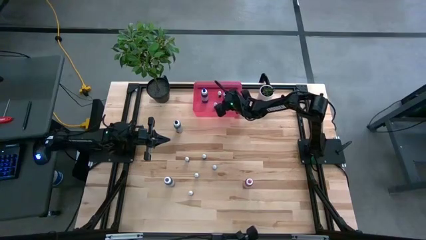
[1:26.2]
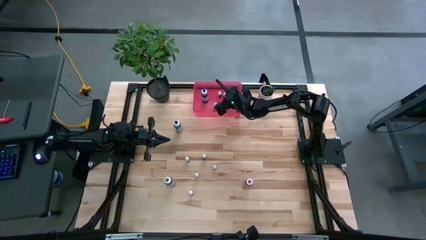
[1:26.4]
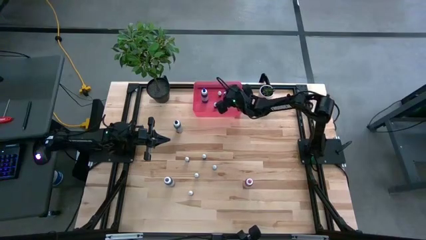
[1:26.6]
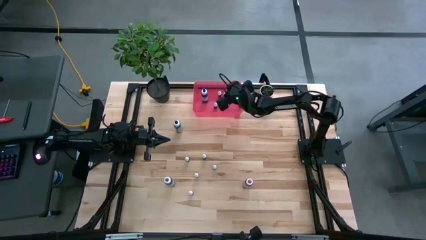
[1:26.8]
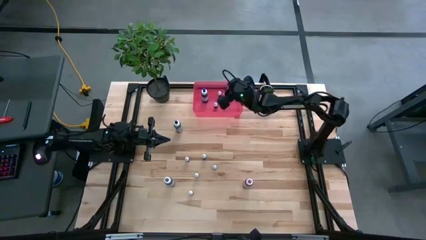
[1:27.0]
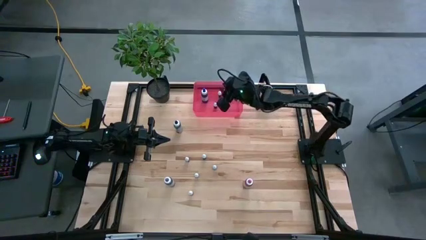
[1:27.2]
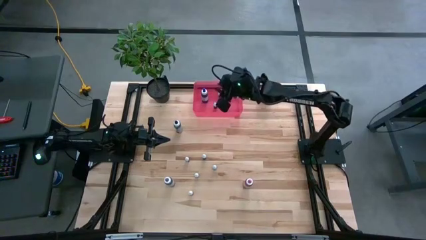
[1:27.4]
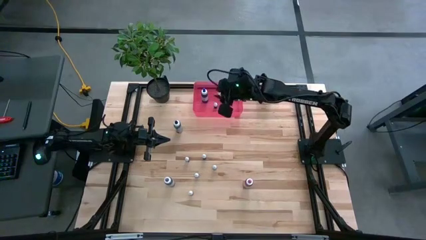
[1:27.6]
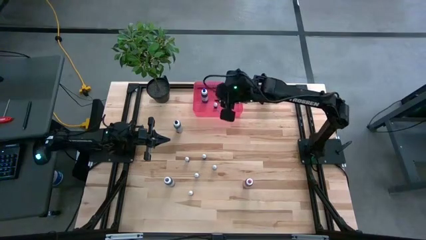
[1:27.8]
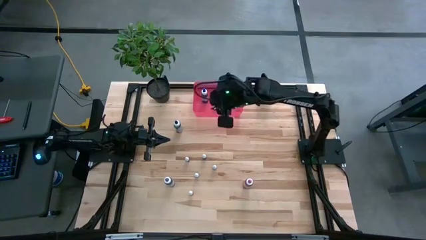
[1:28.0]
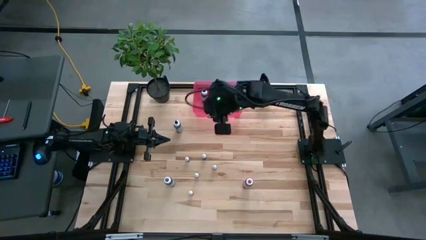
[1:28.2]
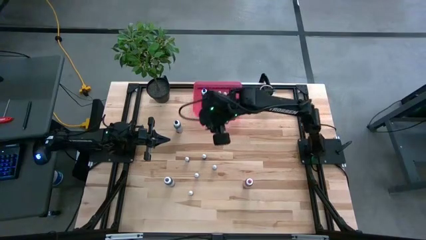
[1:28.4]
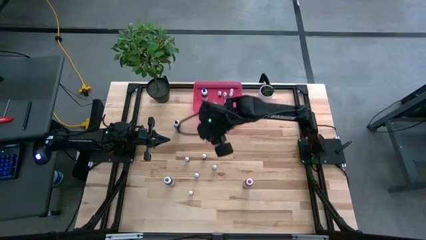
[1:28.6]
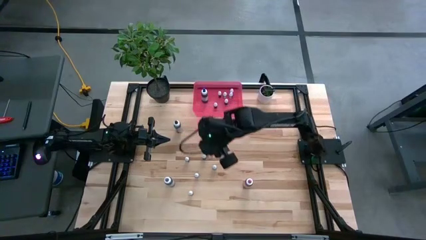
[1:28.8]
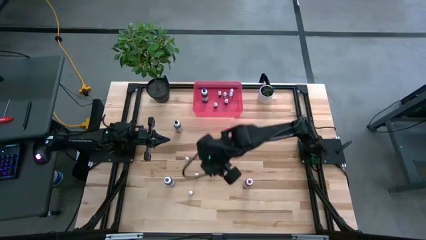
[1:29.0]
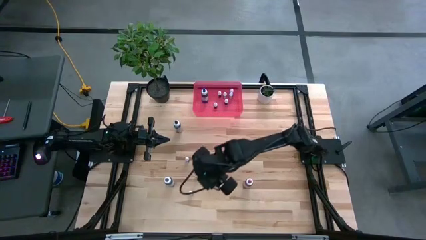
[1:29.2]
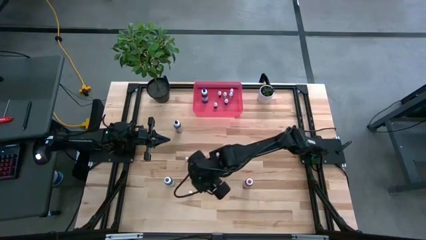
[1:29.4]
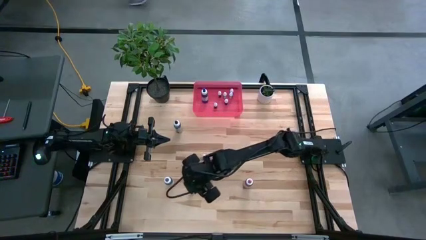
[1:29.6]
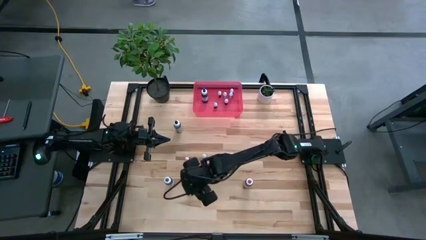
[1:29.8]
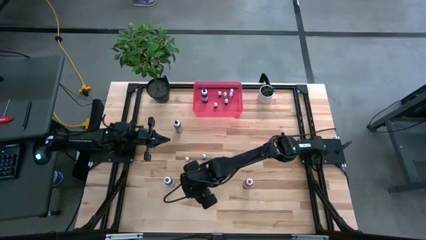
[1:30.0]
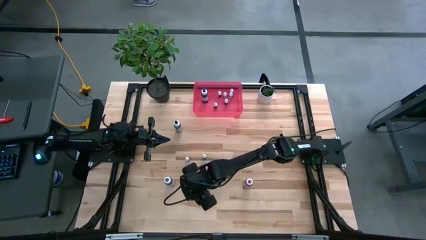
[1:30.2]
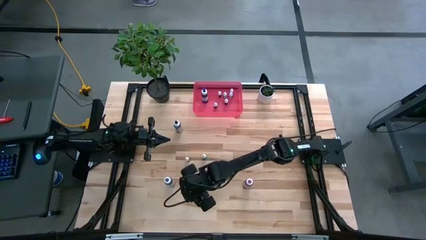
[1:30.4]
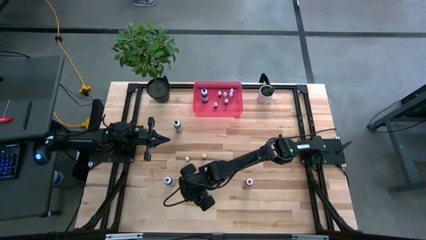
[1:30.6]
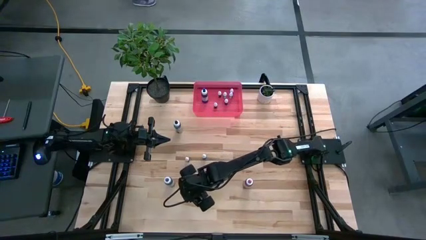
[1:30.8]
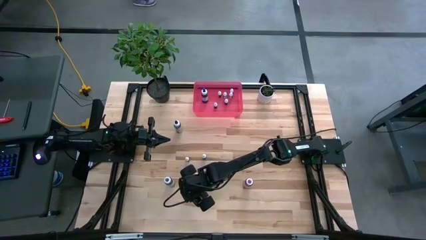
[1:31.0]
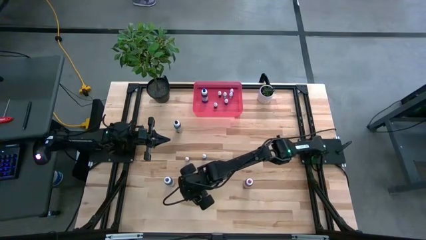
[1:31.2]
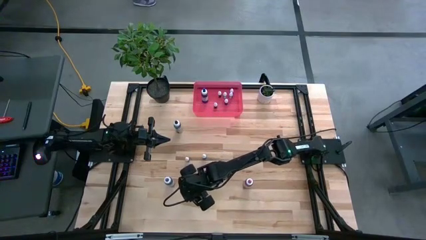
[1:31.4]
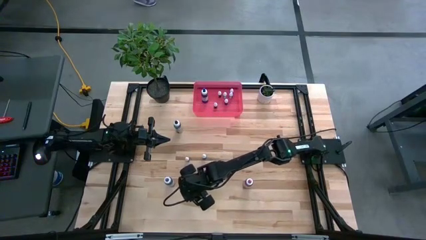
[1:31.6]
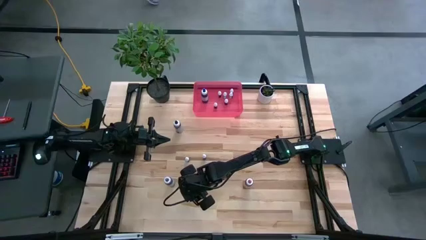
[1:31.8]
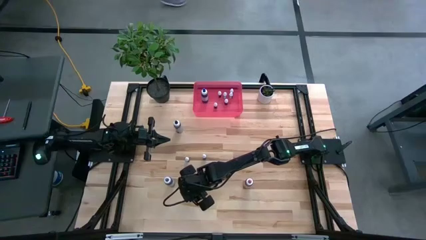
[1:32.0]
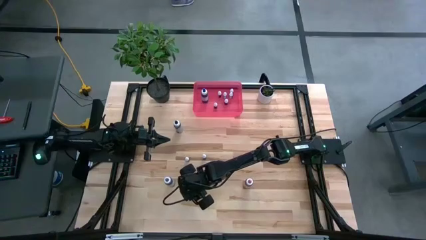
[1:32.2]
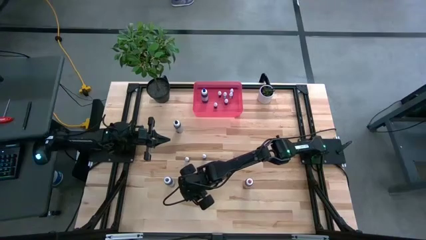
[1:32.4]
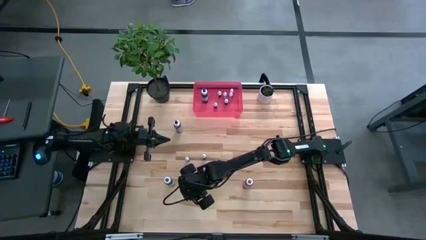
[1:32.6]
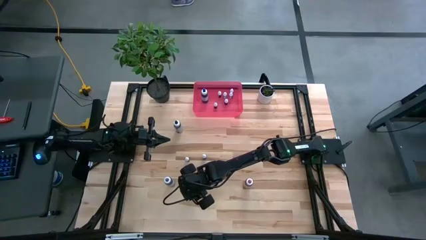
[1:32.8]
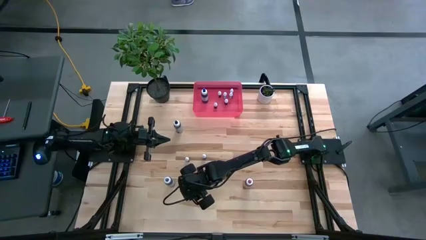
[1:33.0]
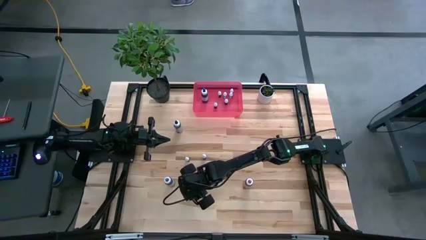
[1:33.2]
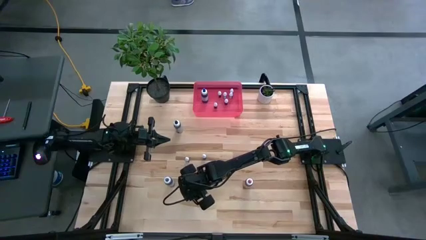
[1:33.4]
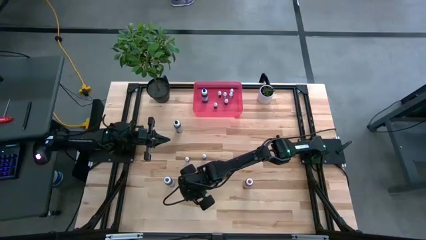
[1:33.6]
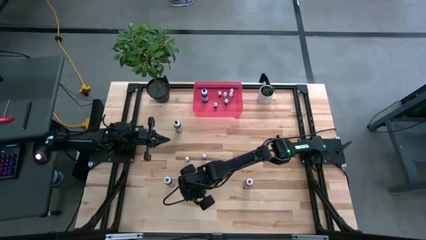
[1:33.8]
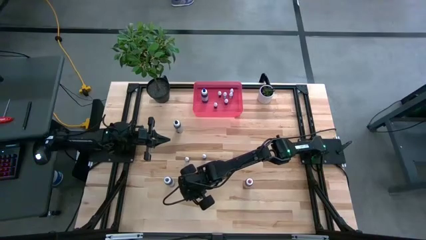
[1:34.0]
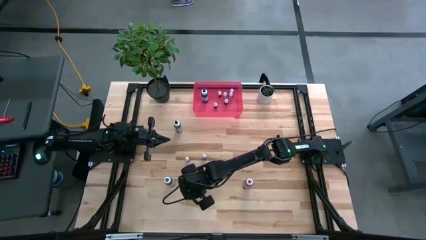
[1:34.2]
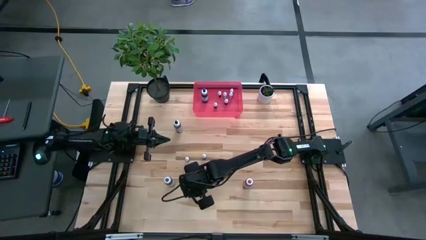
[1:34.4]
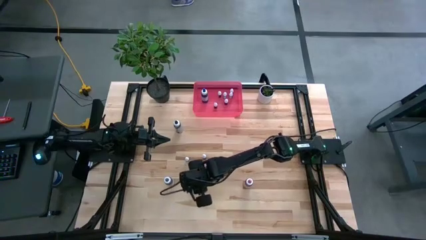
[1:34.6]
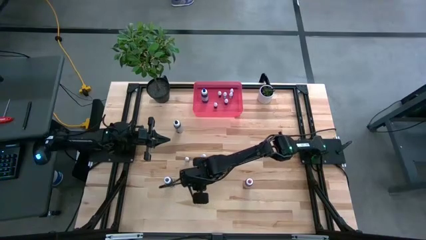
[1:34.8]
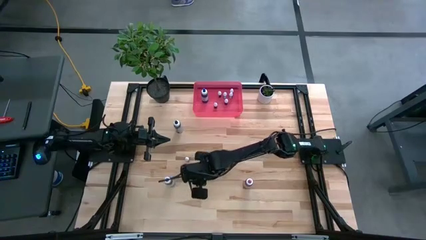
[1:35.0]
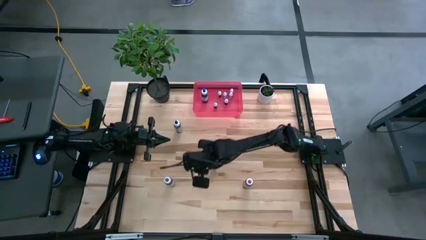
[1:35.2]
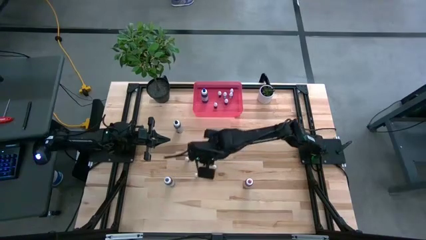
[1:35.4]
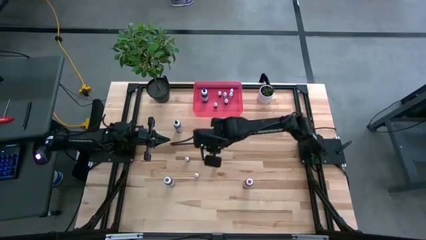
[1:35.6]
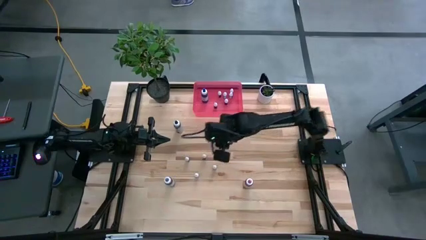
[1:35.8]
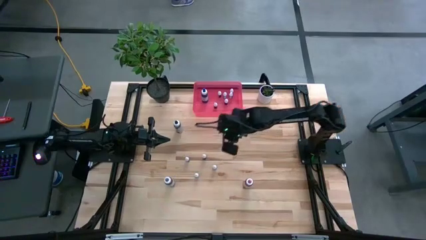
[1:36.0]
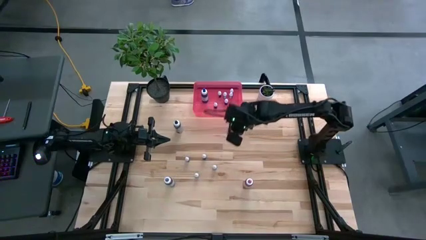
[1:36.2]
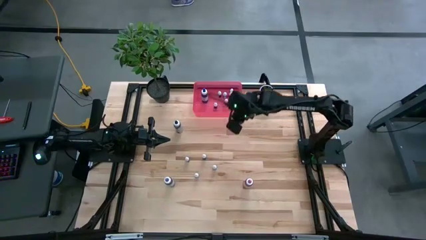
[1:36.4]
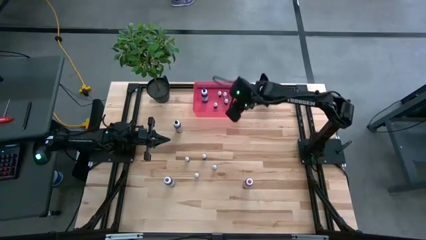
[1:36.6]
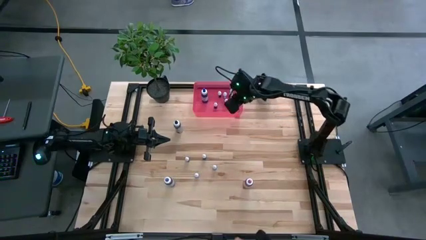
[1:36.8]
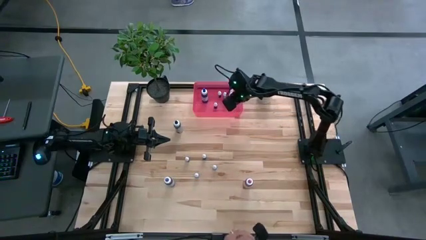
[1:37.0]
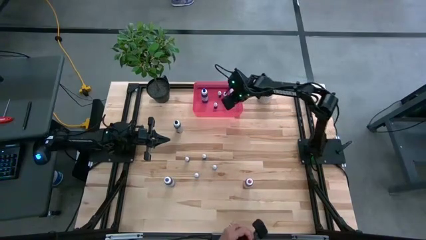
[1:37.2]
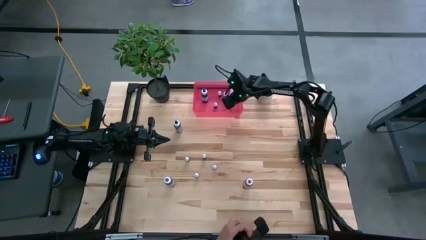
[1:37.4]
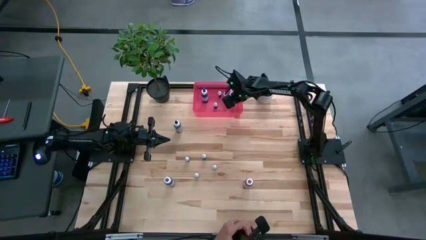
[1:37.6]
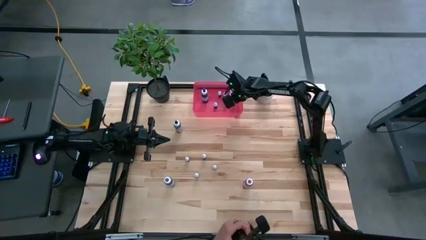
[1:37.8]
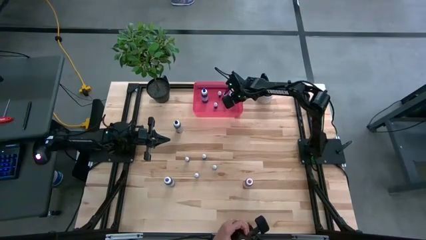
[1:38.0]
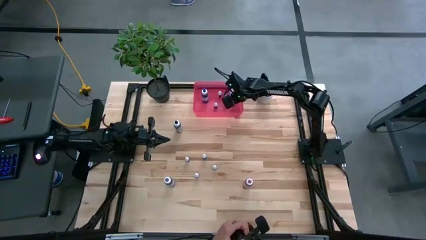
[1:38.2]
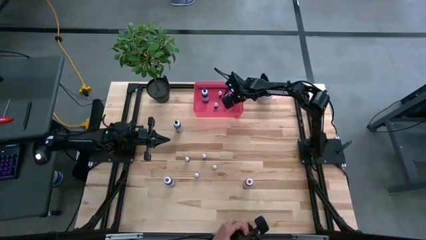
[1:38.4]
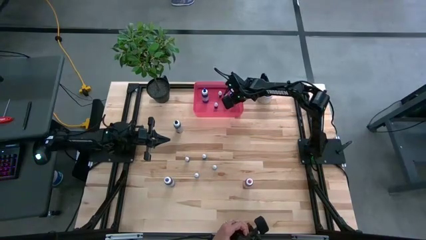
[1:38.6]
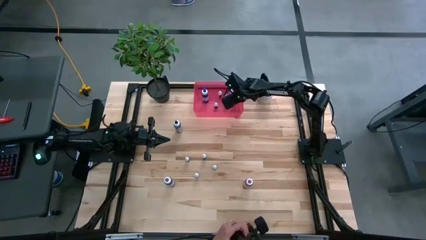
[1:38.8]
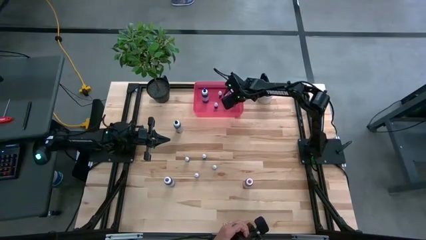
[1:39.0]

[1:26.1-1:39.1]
Task: Pick & Place food coloring
Put the small orange food coloring bottle into the red bin

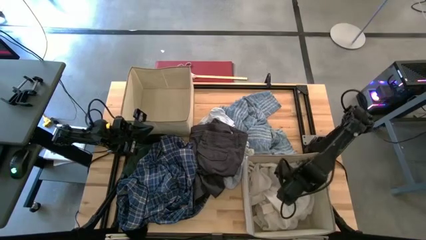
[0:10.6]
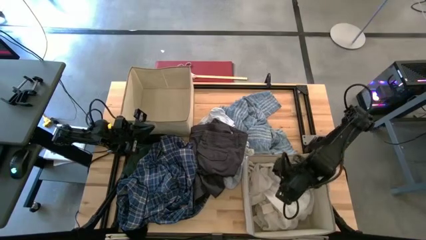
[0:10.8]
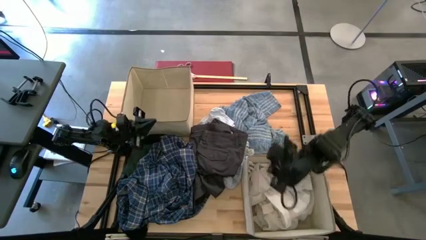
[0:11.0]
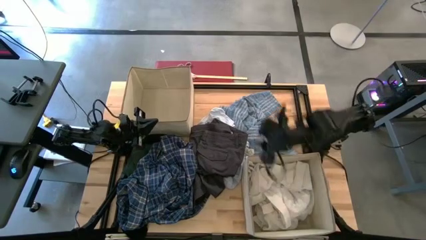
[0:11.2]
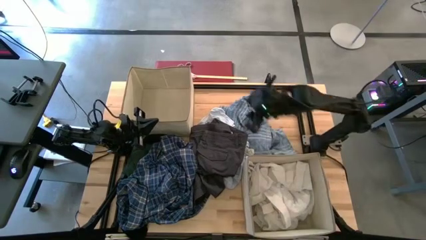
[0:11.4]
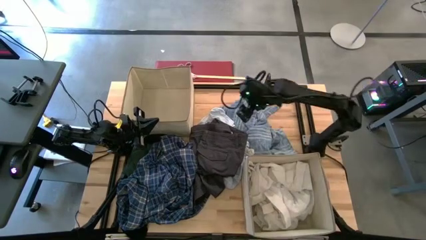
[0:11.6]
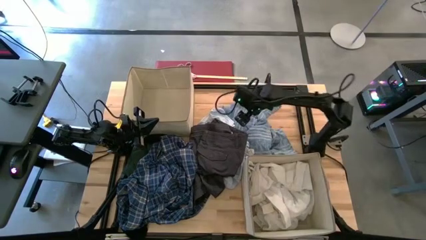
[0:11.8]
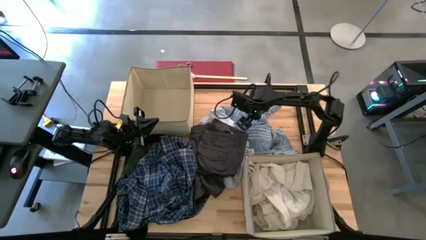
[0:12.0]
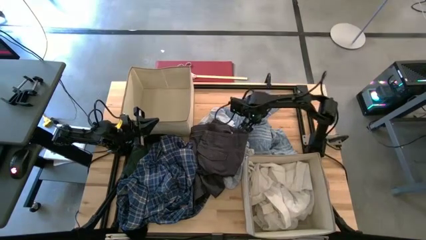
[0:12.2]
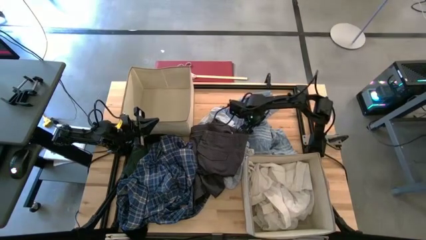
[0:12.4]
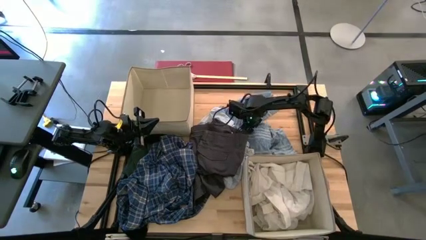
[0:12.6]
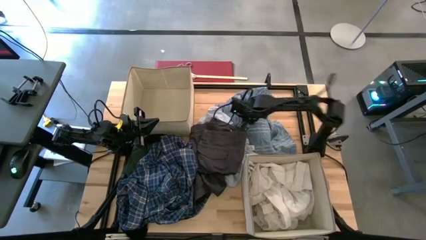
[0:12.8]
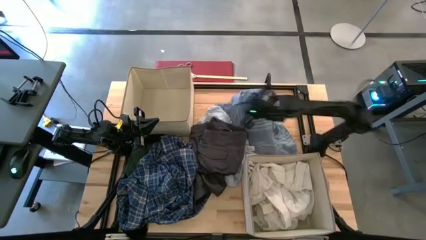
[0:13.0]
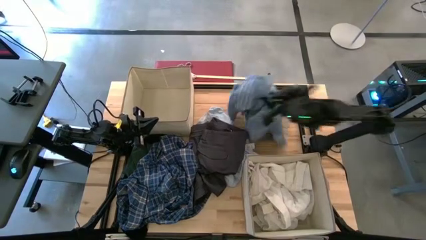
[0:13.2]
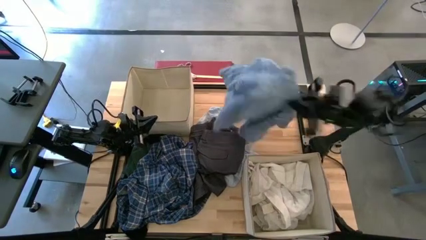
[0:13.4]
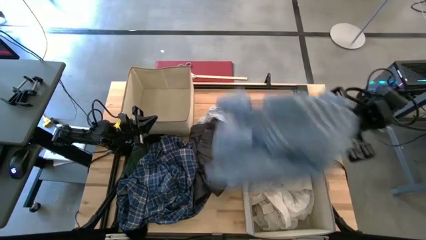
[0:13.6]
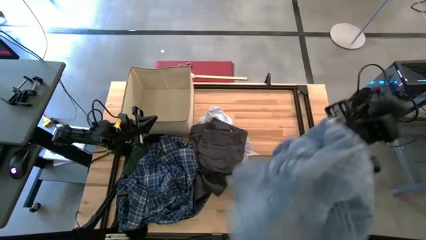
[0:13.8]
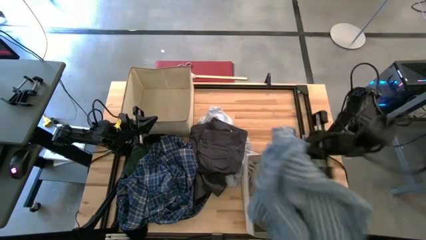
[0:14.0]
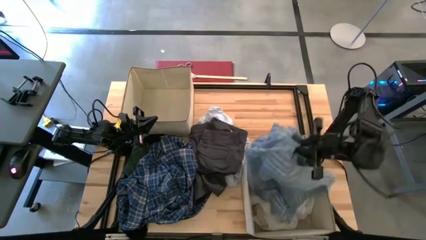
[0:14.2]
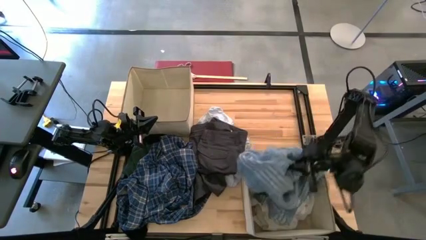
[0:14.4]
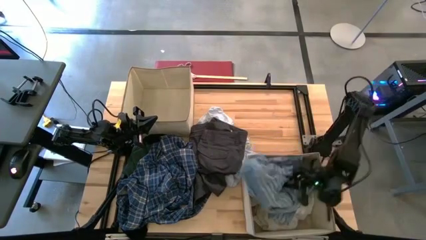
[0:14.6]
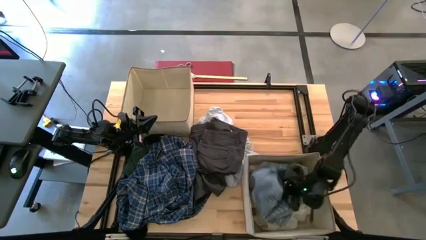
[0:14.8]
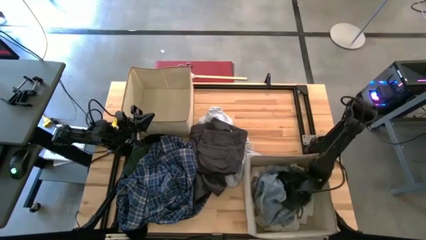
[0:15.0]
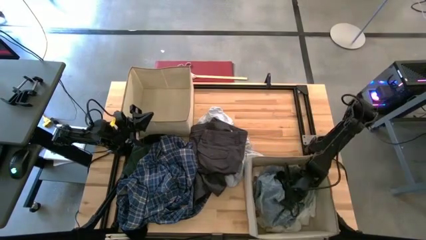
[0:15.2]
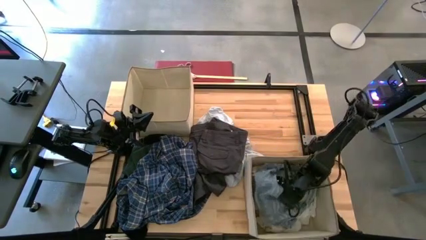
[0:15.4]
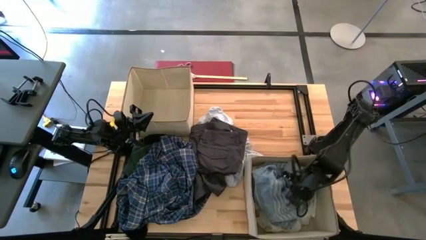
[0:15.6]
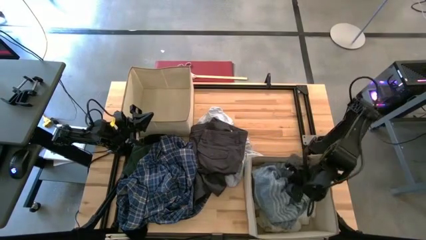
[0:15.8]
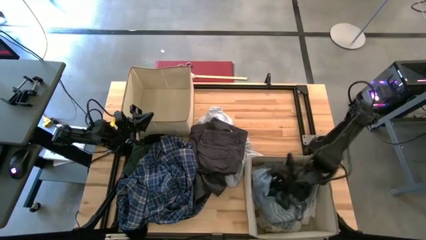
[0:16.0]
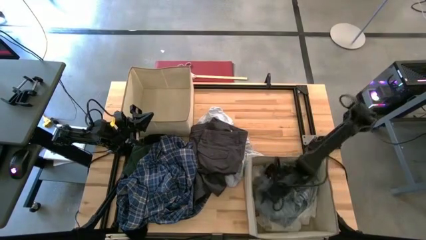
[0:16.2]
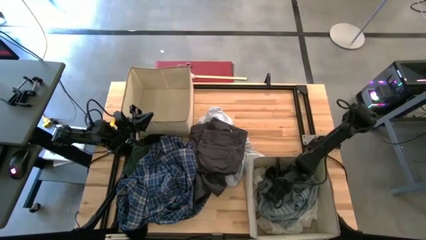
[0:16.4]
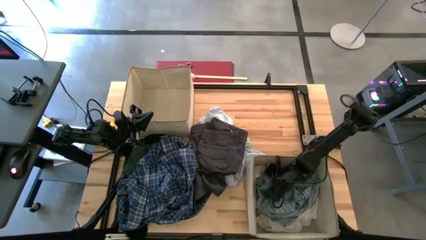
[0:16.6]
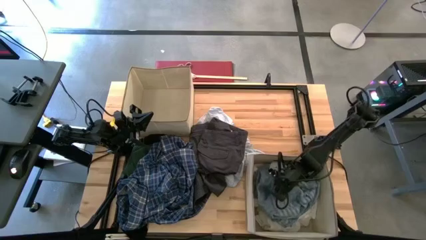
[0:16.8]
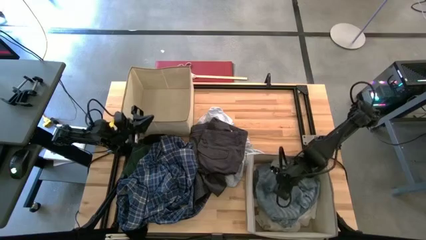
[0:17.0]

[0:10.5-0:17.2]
Task: Sort clothes
Put the light blue cloth into the bottom laundry bin
